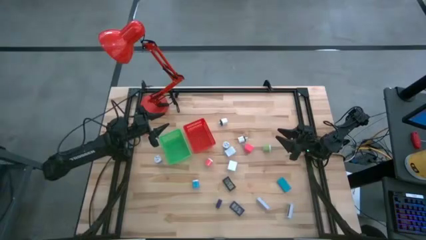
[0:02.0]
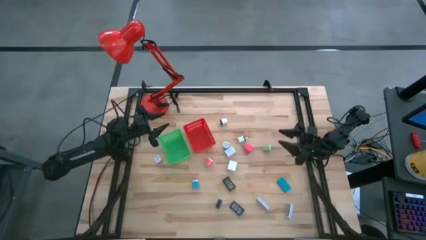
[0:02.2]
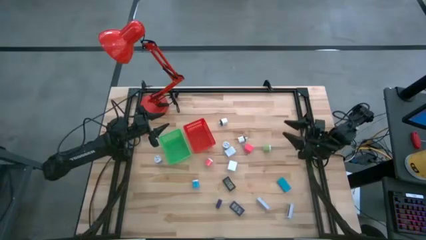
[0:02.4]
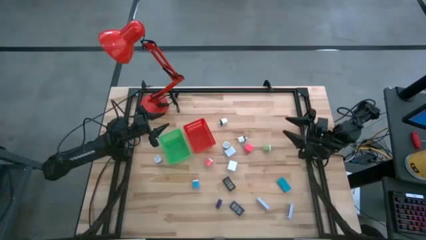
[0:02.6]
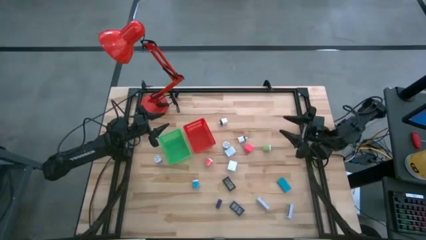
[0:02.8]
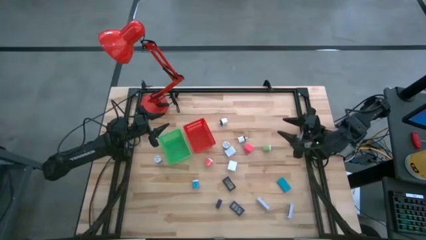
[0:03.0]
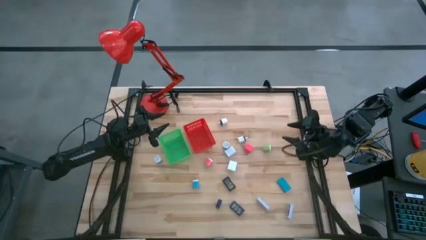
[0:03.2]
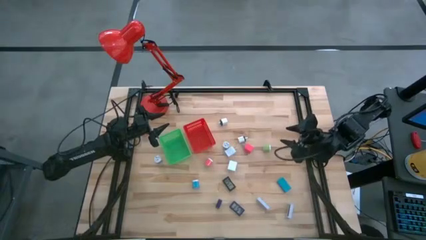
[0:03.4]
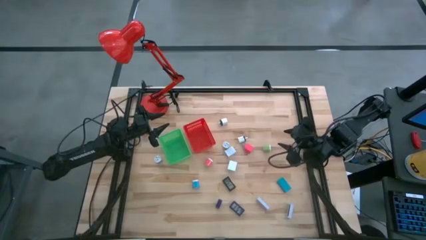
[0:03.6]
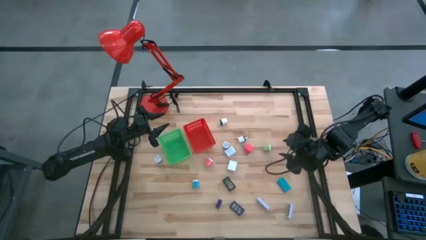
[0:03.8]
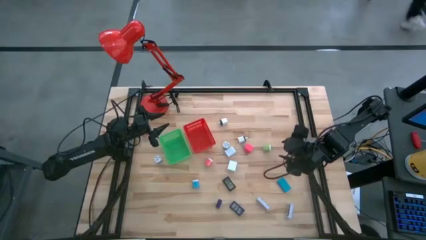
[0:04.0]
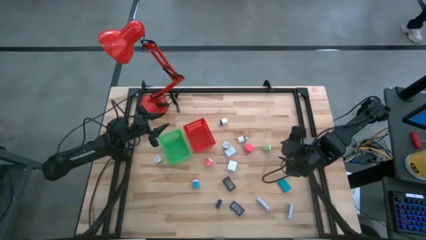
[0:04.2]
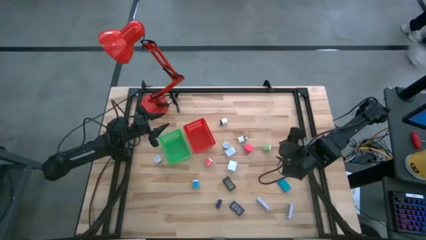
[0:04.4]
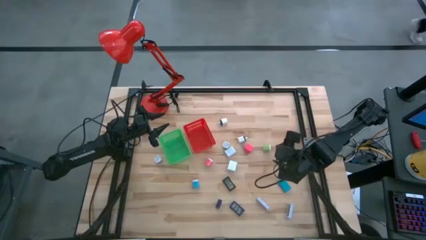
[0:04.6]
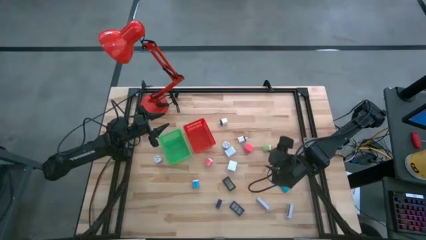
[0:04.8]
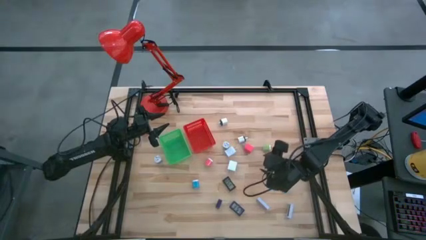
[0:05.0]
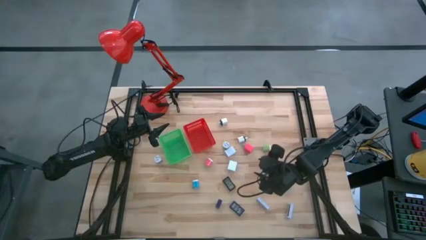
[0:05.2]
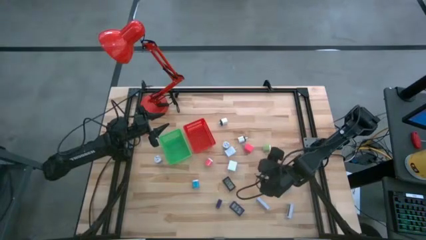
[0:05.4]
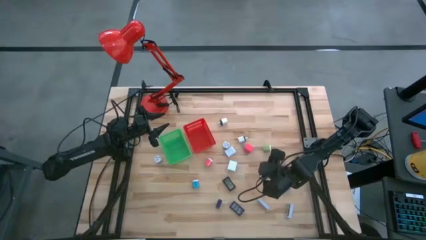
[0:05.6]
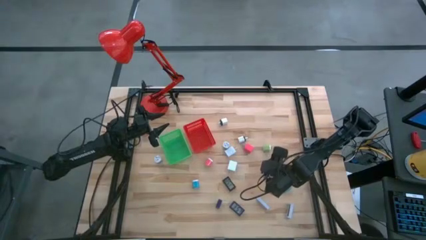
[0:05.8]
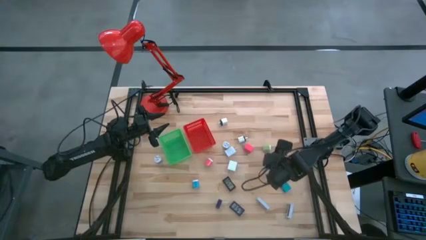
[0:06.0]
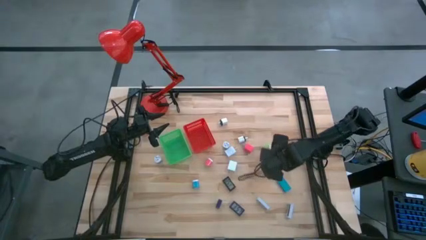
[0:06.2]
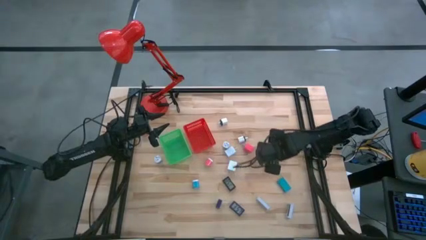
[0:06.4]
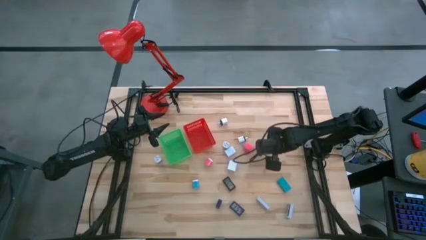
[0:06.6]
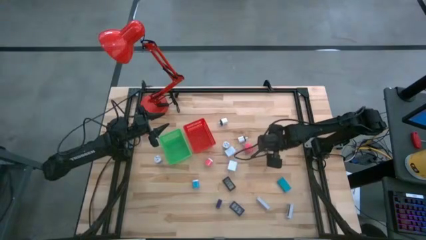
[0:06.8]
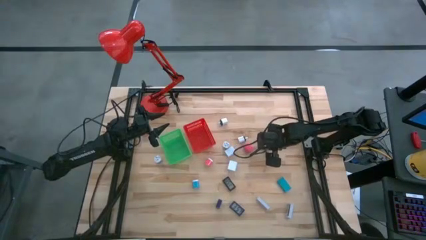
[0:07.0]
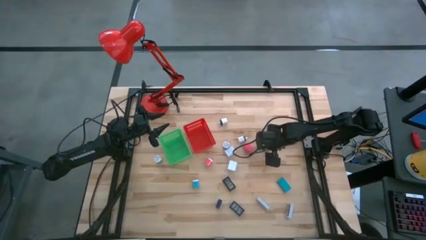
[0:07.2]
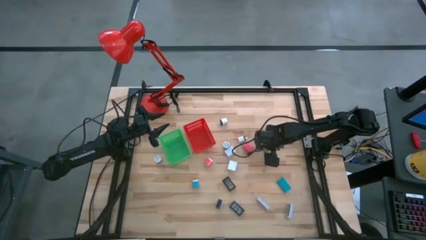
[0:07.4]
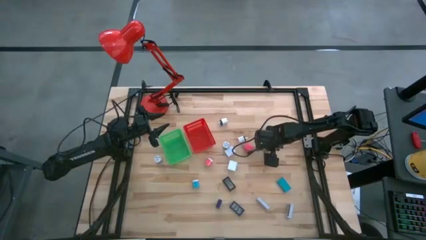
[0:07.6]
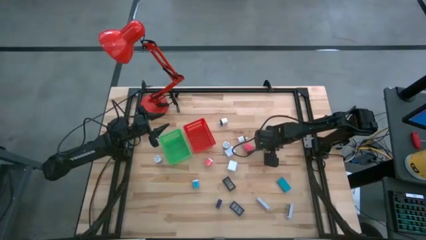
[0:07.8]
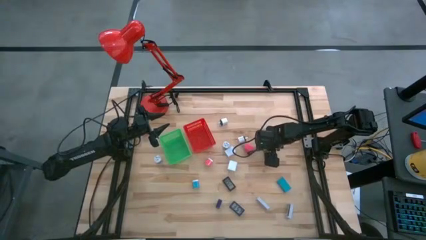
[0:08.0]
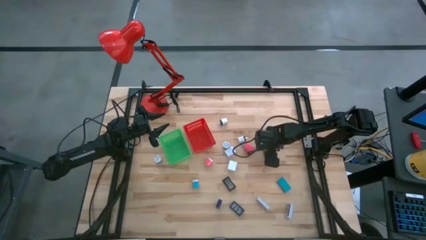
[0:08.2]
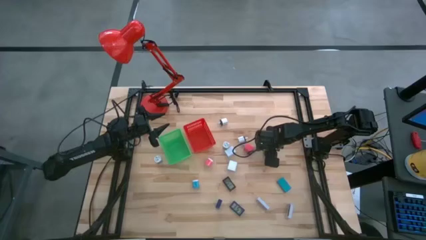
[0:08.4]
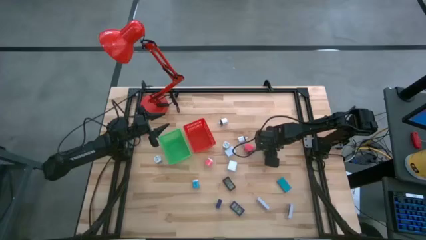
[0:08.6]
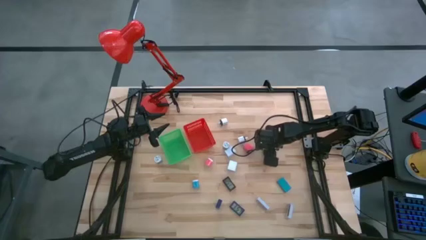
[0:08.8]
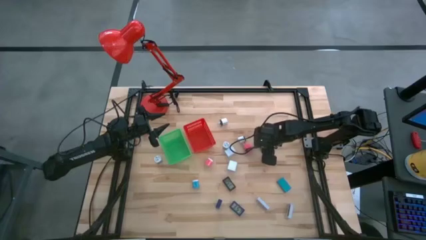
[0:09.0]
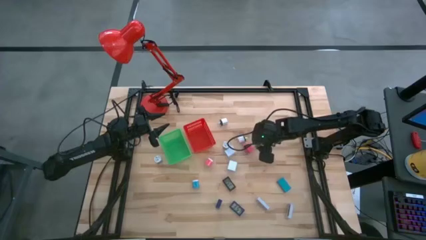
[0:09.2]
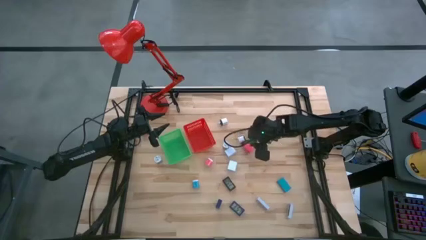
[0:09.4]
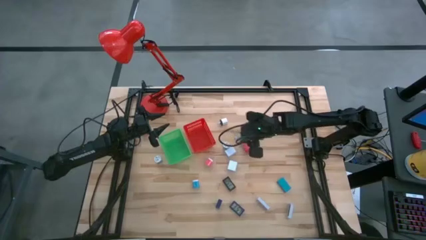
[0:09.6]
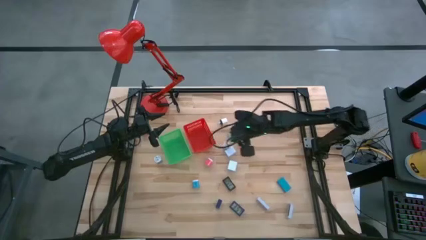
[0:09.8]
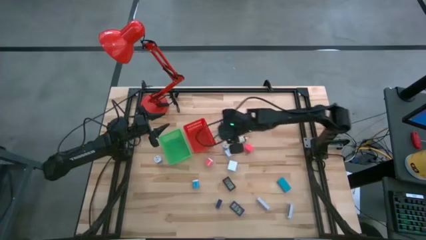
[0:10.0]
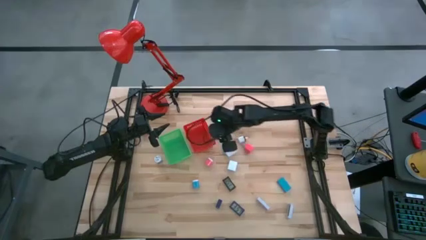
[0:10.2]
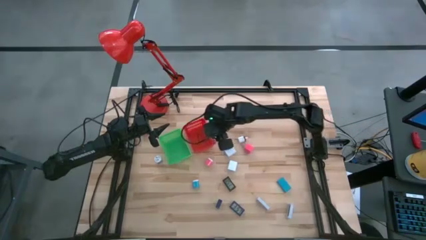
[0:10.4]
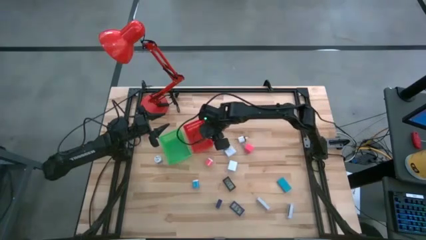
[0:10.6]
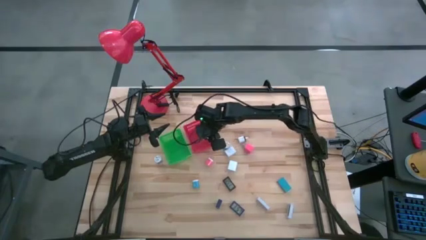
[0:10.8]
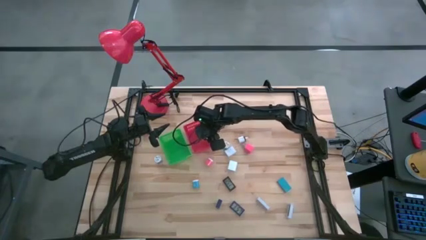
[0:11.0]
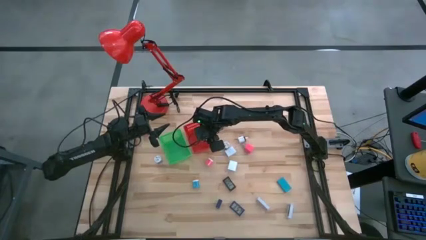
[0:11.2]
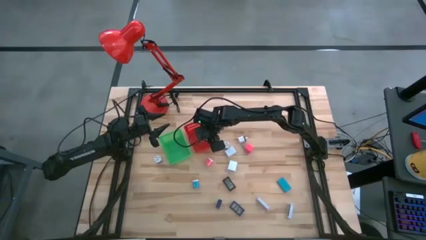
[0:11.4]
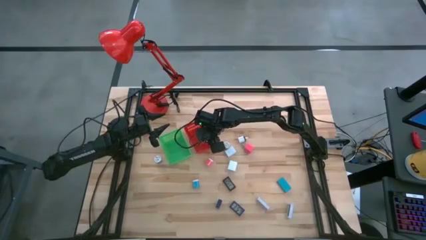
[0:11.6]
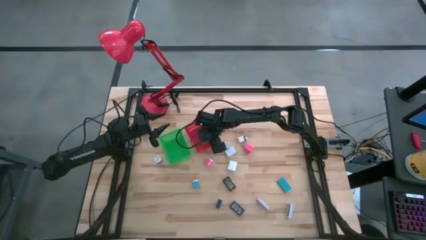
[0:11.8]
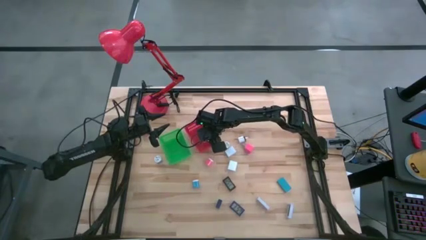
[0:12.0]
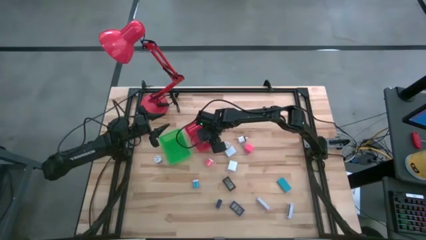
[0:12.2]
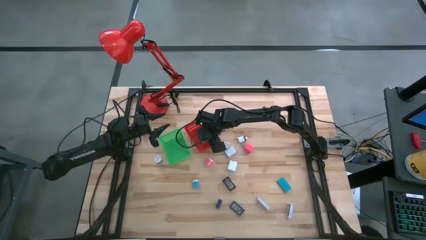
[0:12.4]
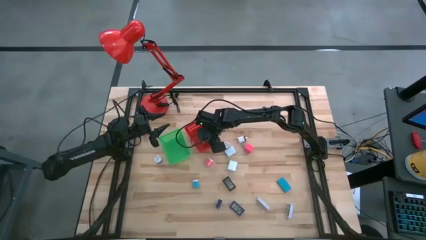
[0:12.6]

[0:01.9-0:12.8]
Task: Pick & Place Office items
Put the right green charger adapter into the red bin

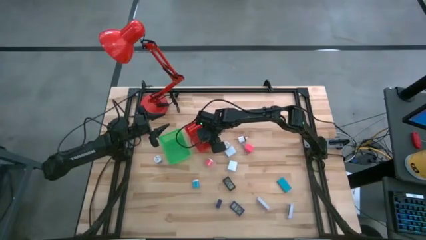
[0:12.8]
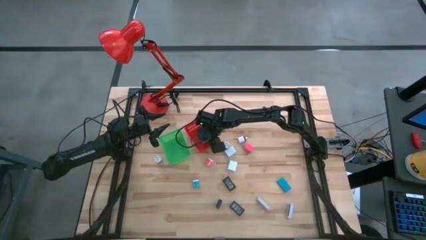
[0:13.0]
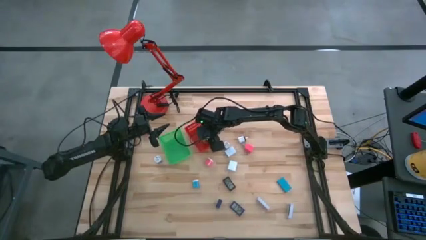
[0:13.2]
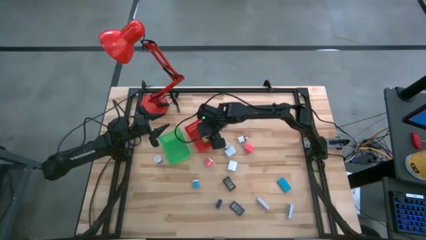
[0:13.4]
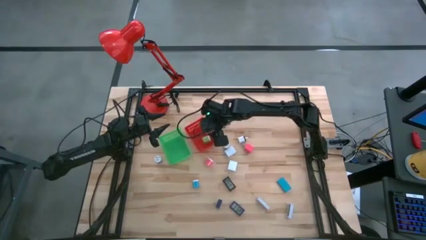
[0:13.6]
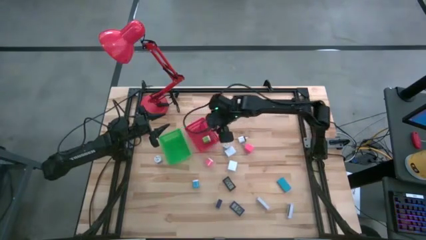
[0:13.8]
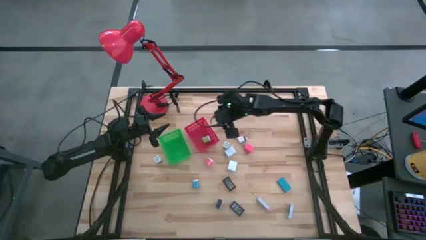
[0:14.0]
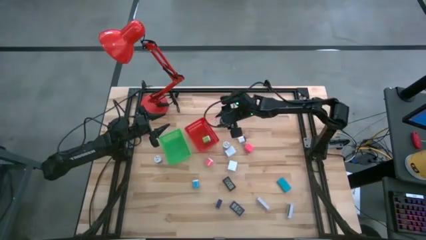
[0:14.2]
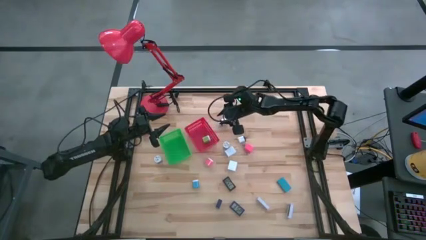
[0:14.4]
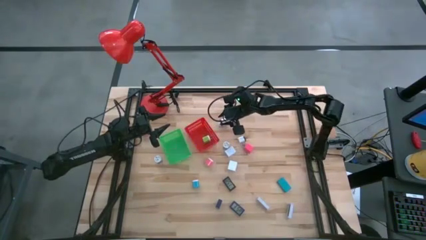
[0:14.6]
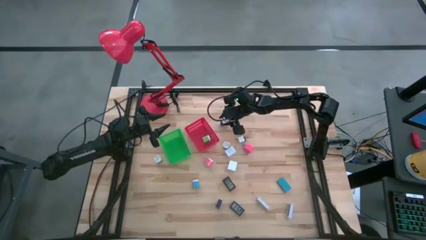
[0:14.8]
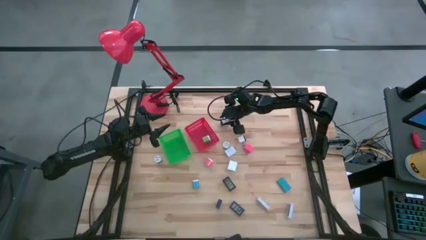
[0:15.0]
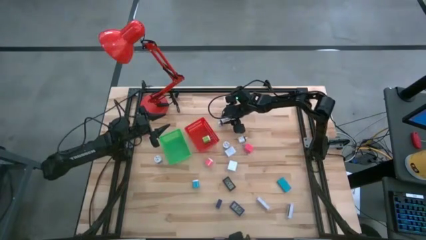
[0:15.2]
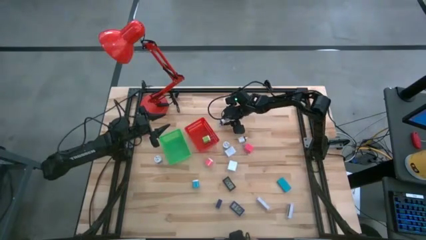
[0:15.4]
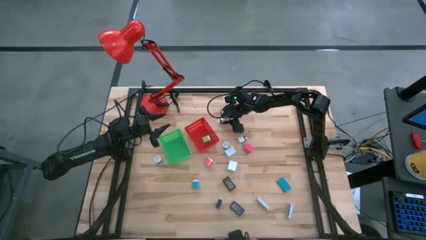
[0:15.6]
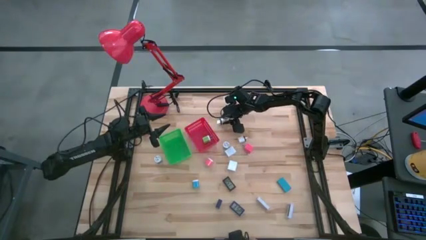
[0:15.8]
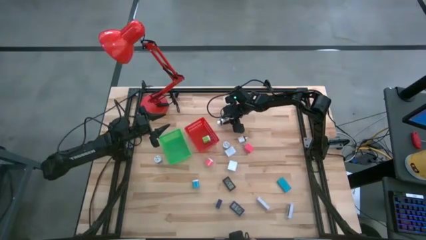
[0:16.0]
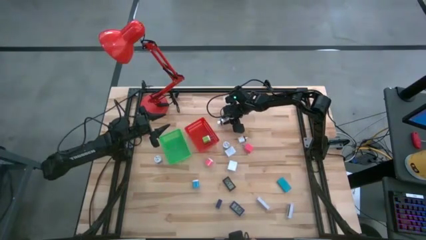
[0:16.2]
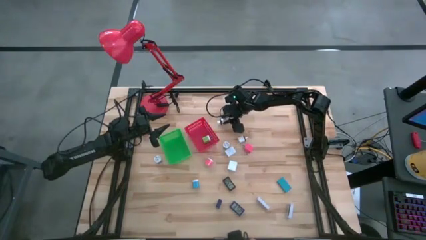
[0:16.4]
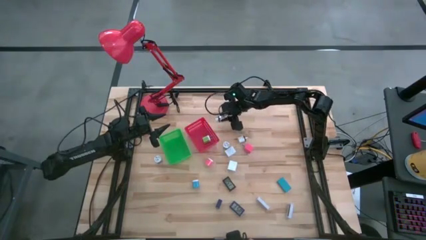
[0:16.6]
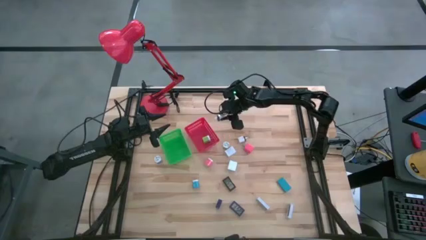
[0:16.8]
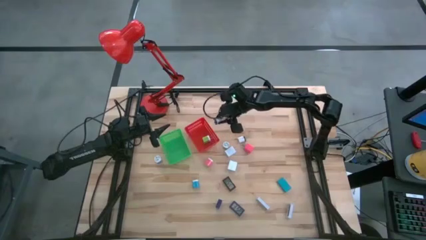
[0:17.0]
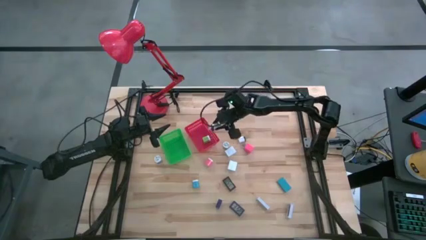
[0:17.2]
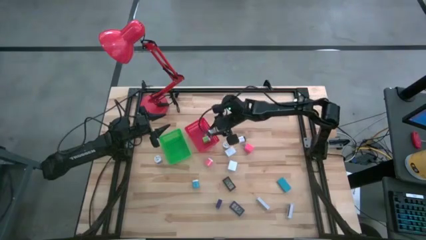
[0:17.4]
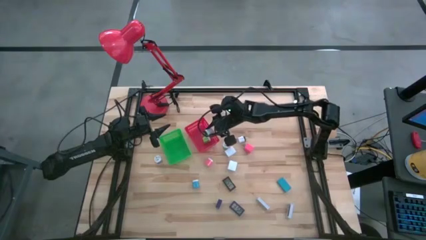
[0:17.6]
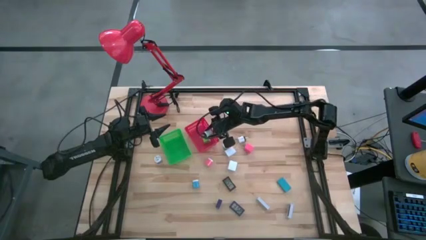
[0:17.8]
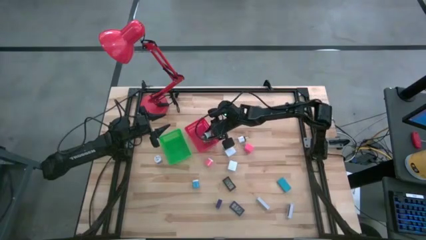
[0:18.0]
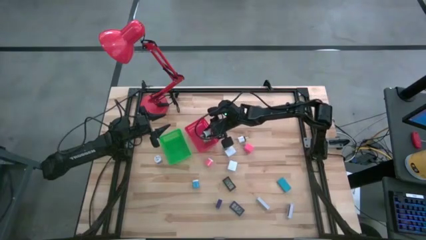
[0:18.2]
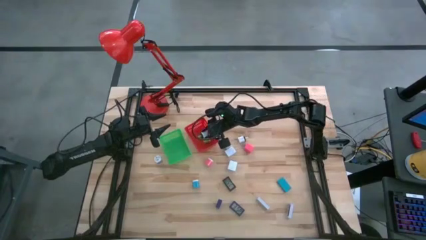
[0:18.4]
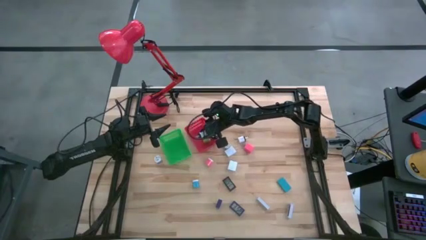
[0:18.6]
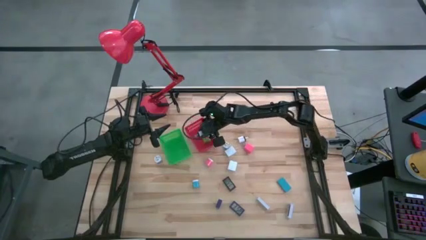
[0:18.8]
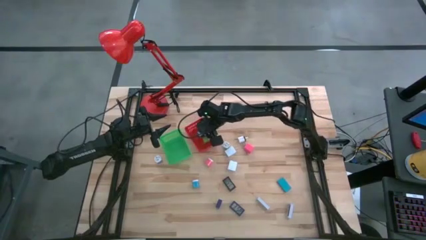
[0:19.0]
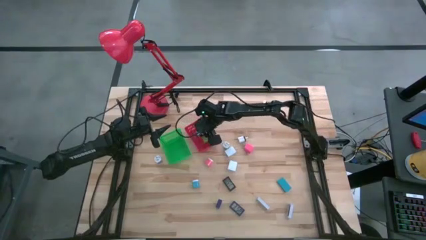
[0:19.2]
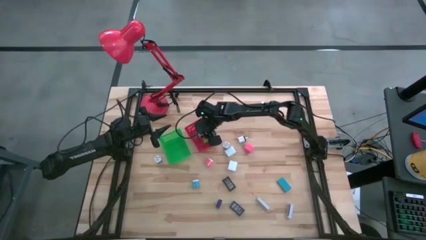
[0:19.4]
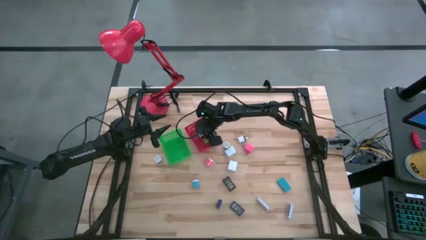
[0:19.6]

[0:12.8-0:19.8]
Put the top white black charger adapter into the red bin
